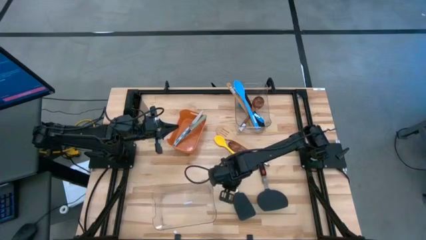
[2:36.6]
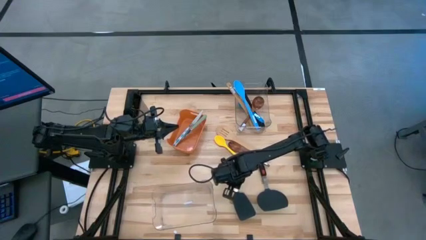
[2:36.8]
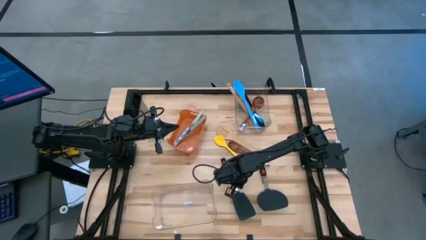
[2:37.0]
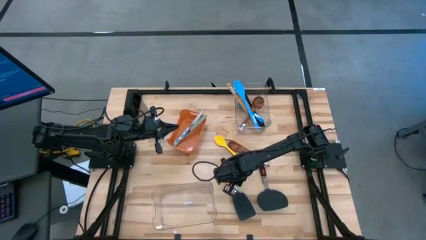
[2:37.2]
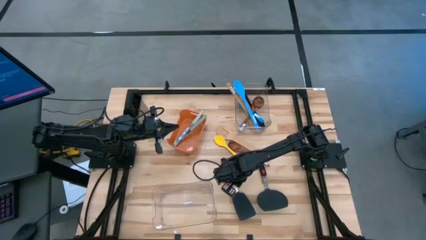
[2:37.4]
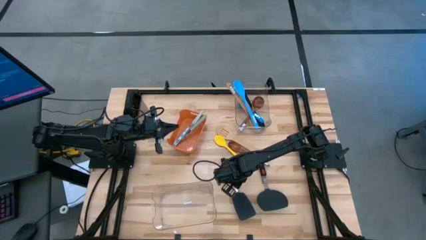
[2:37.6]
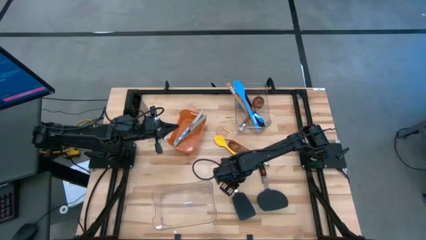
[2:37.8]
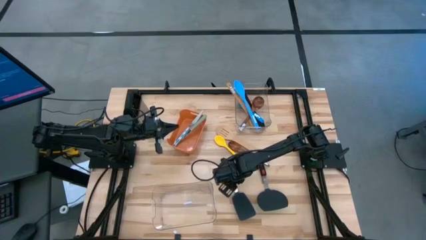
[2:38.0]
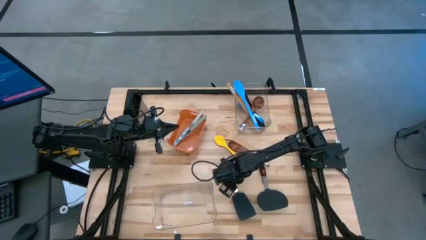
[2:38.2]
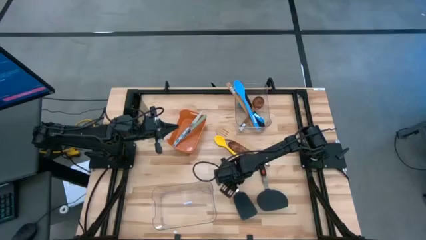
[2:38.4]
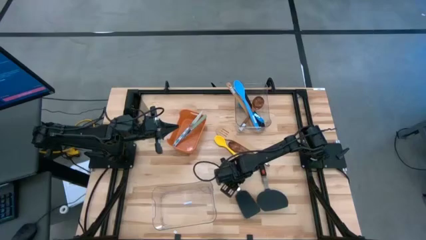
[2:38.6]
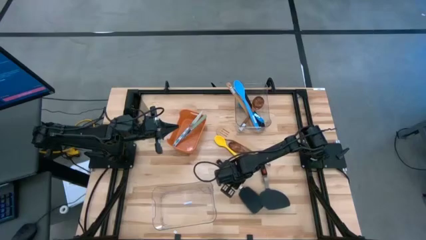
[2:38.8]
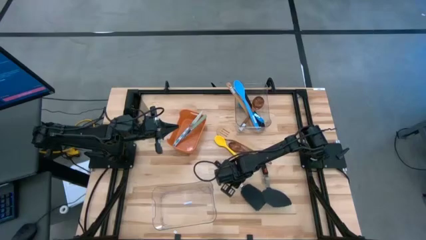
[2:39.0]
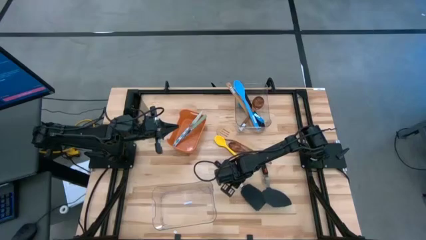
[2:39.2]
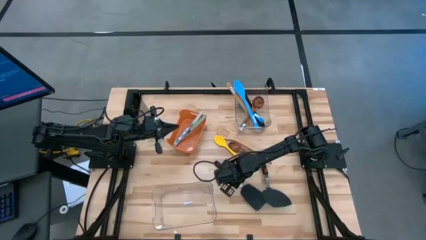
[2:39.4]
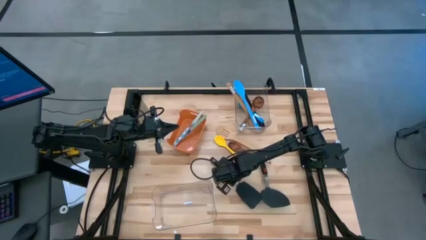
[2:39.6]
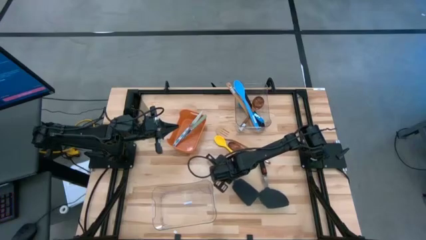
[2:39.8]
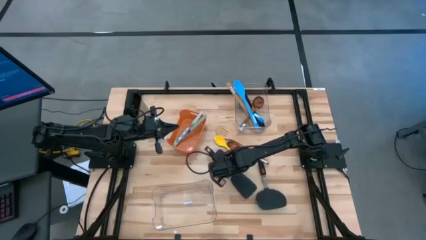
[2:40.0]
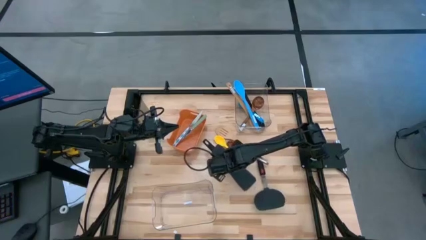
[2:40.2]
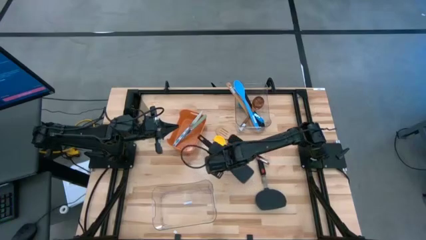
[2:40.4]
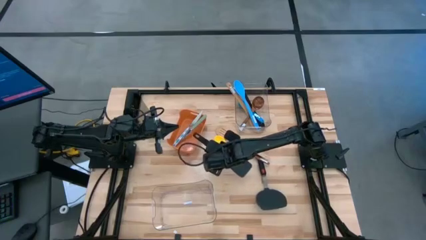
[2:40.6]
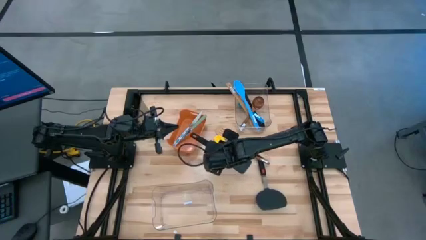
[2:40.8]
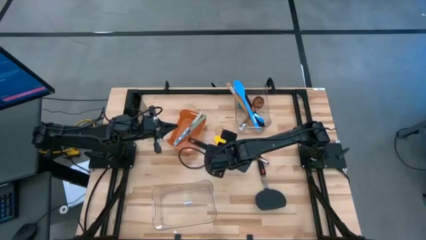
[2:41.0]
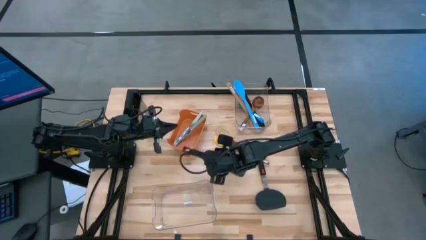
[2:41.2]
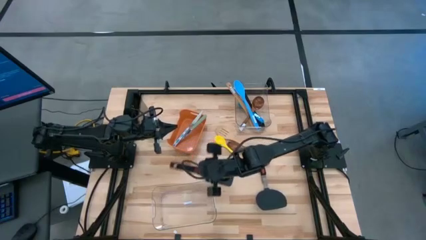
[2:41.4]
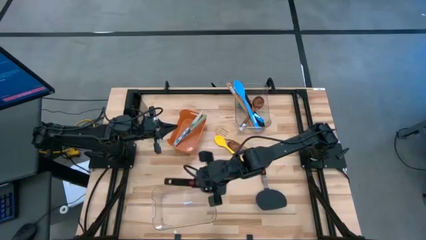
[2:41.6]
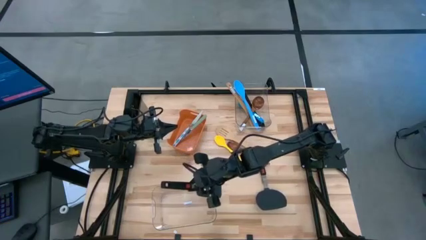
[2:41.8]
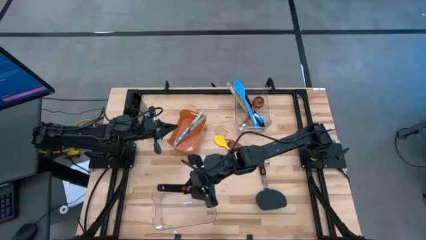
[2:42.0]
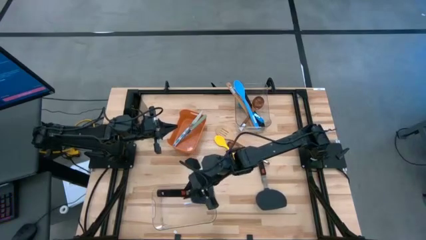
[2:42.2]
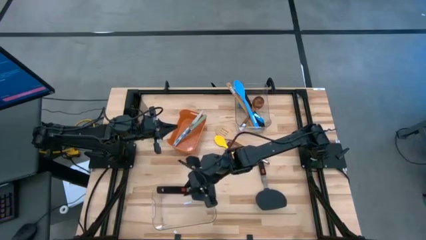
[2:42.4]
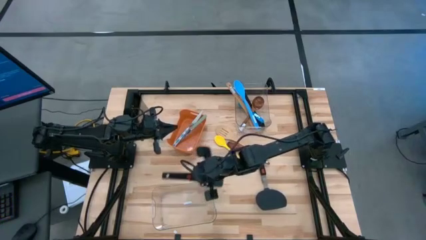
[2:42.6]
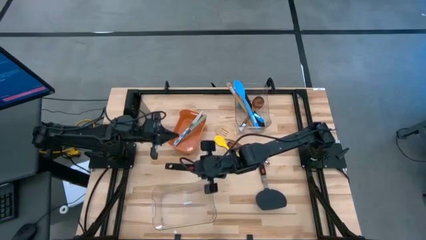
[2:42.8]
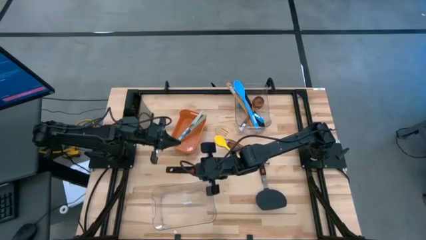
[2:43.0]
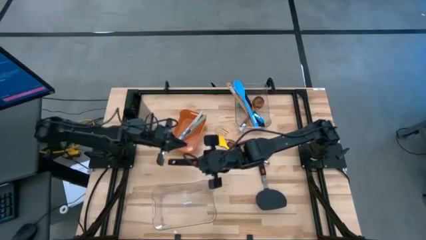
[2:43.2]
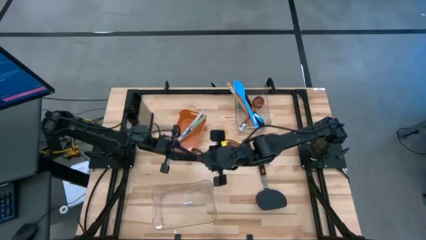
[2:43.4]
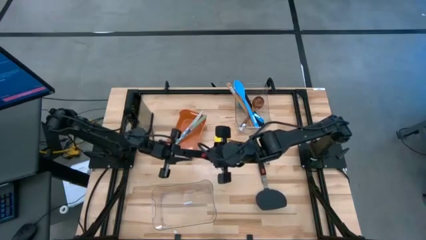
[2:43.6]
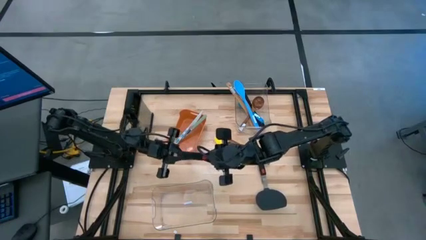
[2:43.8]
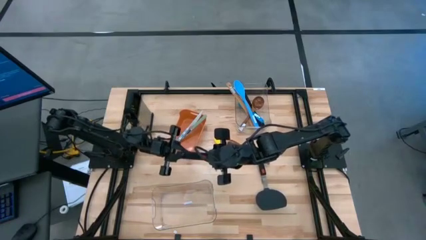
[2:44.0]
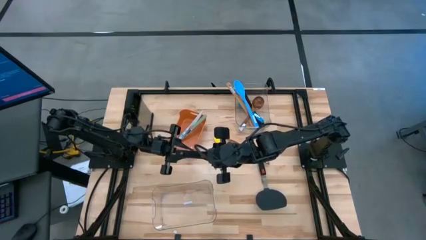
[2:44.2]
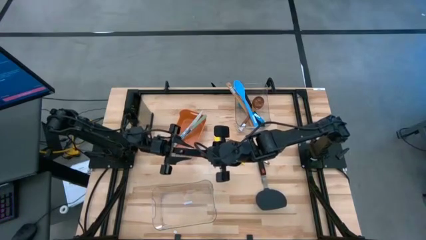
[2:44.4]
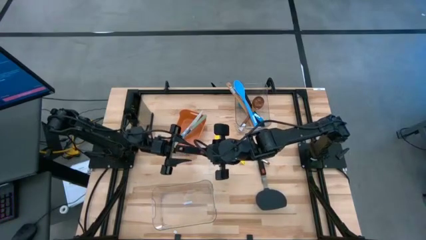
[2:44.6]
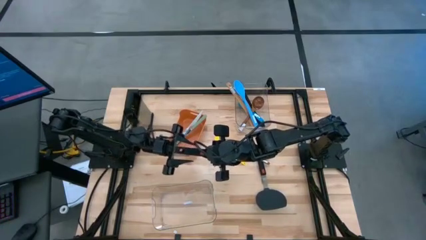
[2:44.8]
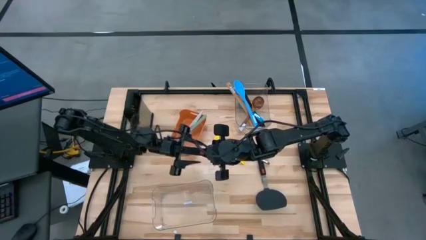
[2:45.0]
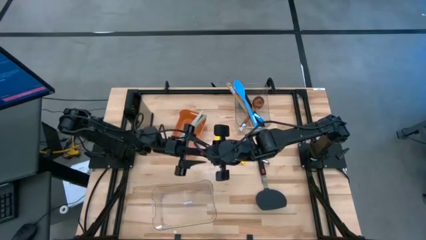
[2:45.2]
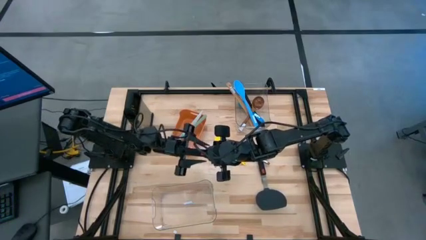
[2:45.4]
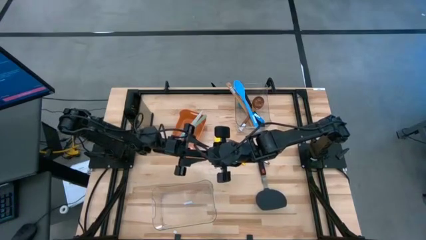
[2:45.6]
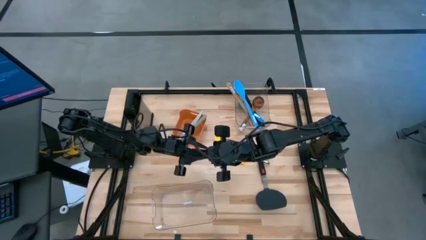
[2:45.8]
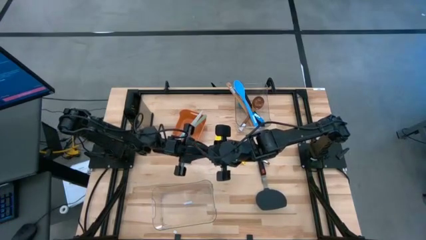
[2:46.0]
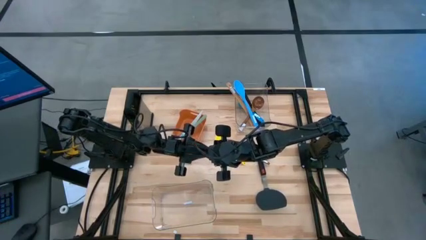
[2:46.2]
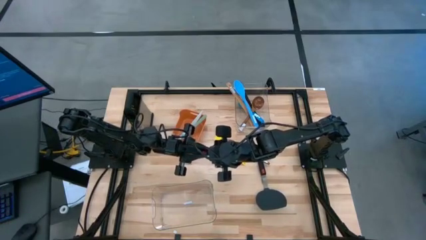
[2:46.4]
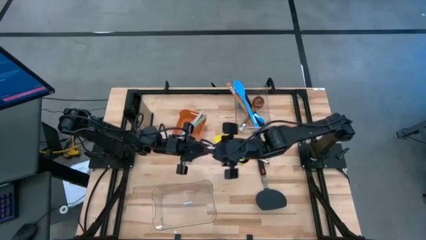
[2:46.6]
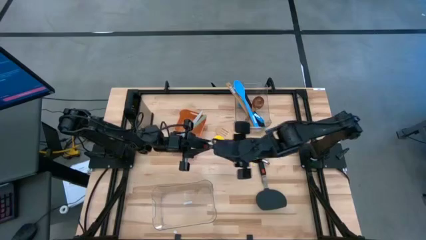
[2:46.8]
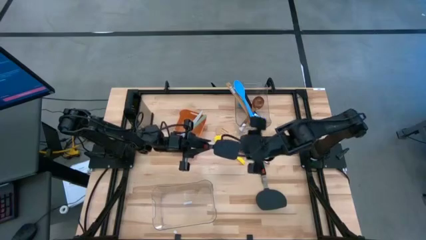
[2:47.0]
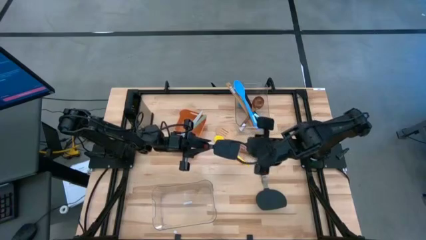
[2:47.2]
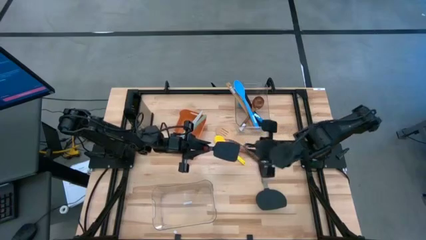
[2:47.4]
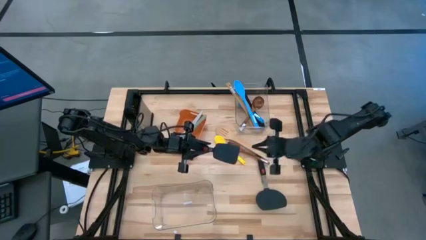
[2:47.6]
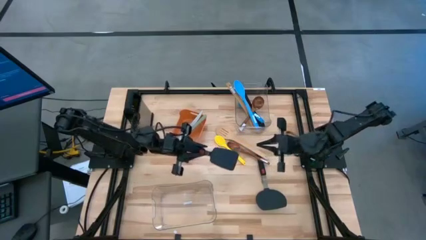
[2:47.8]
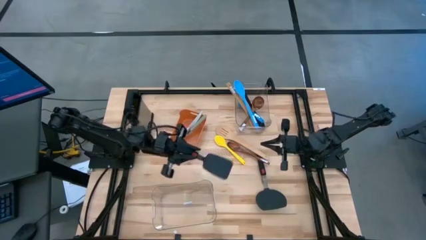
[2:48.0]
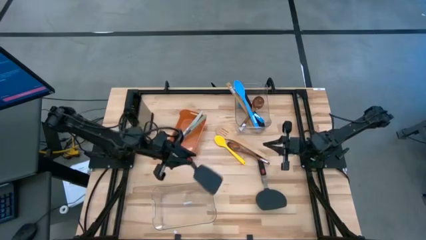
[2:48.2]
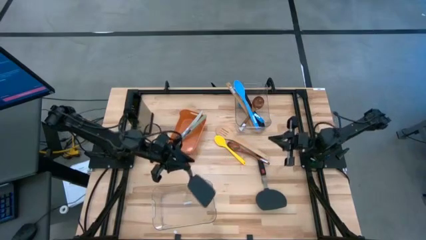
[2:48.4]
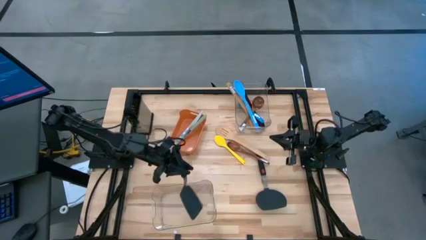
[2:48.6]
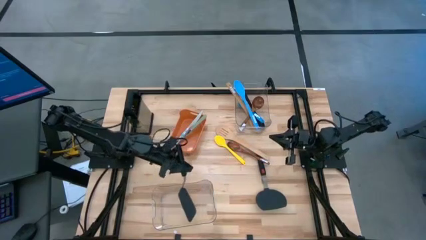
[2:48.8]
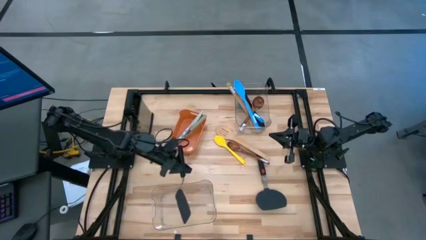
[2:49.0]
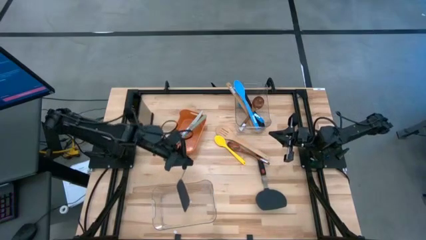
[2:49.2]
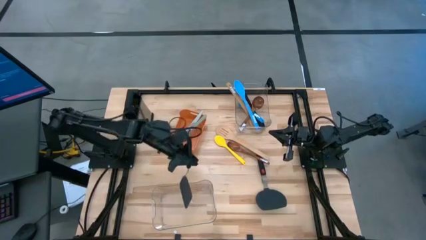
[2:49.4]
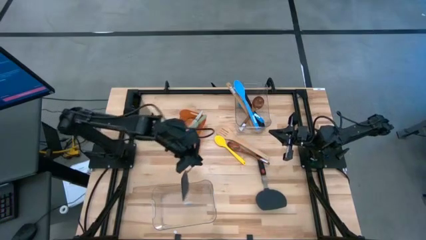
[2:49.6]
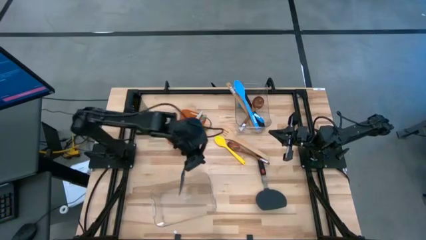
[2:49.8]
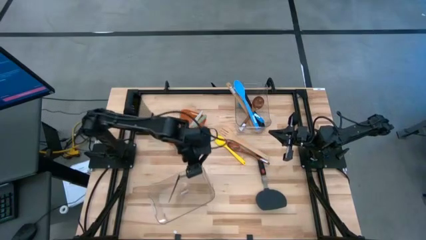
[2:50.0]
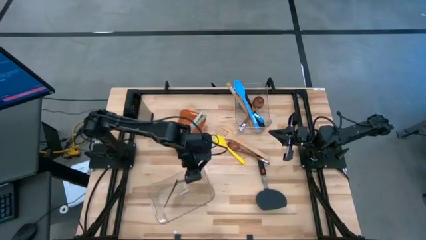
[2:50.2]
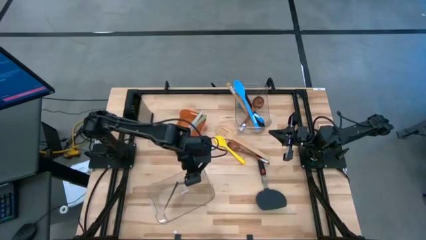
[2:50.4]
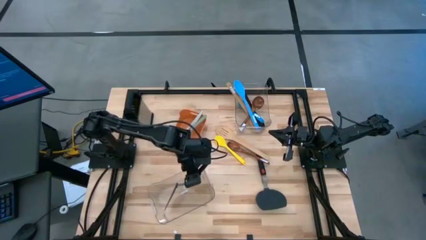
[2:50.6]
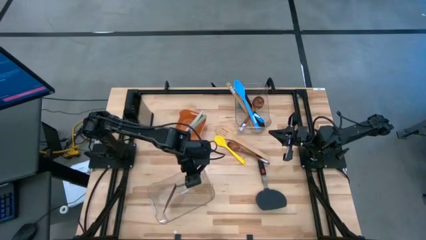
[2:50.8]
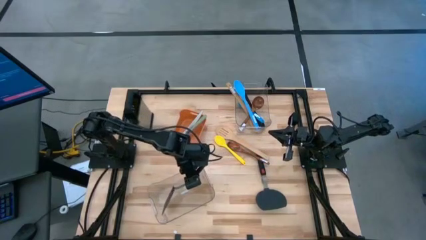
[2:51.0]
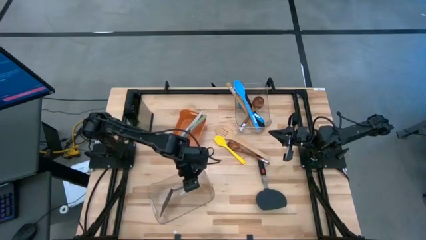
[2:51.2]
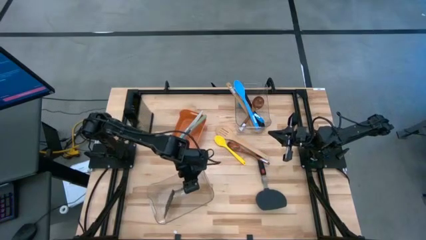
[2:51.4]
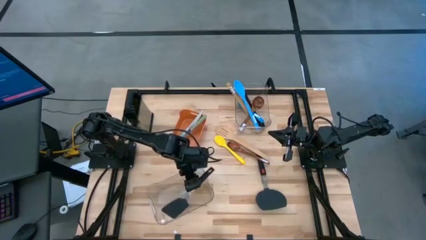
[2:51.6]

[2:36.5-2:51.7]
Task: Pick & Place Kitchen Items
Put the black flipper spatula into the bottom transparent bin

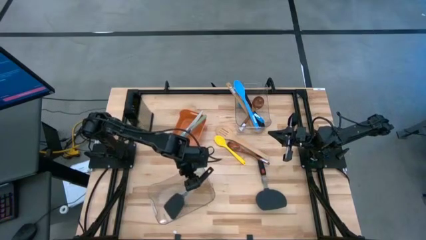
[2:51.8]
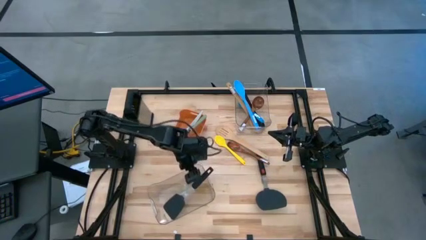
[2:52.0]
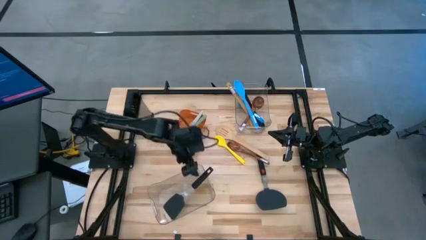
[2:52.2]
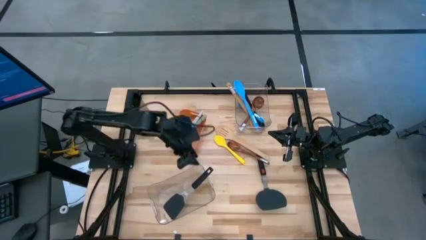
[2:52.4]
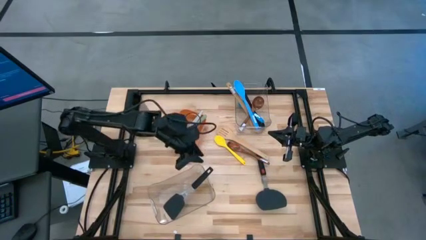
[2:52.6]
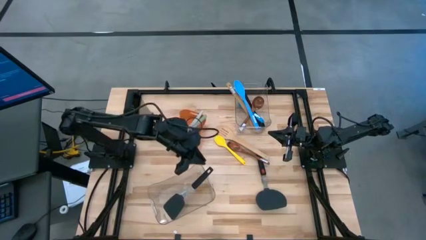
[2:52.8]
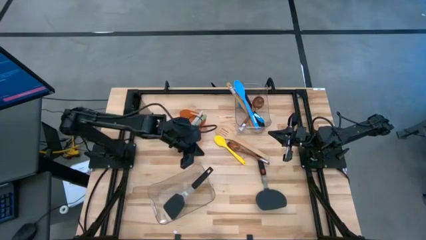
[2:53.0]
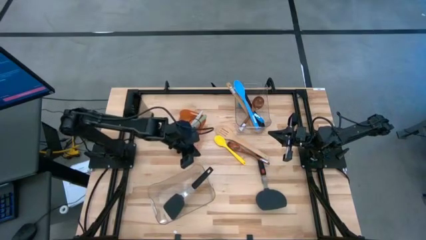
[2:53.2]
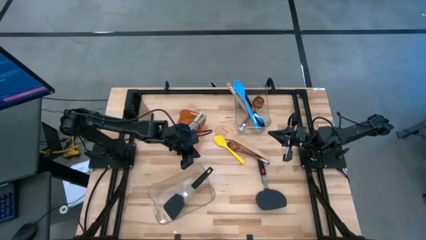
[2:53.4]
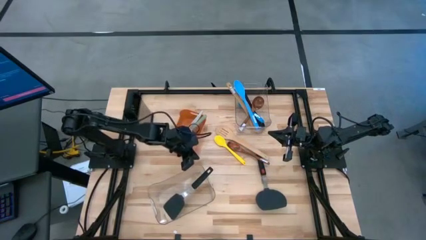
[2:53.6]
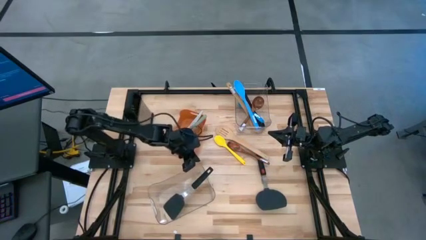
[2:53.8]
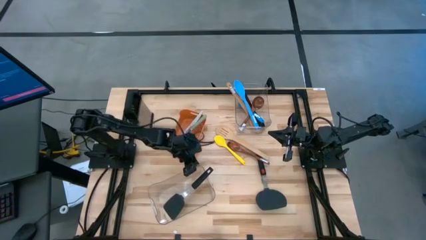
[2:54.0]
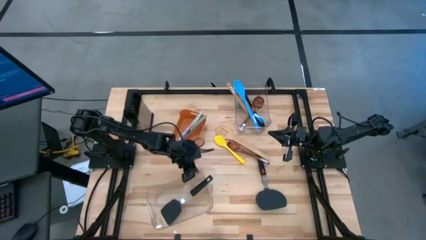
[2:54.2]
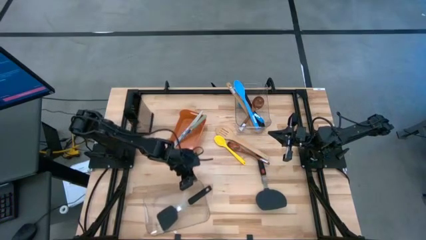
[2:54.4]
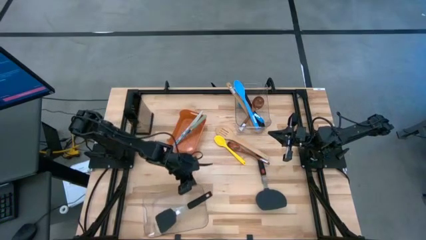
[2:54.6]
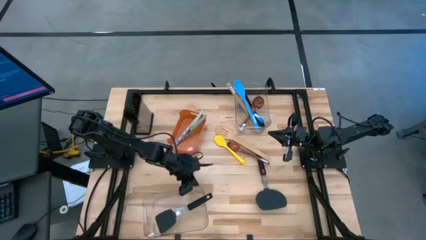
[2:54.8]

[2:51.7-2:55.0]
Adjust the bottom transparent bin
